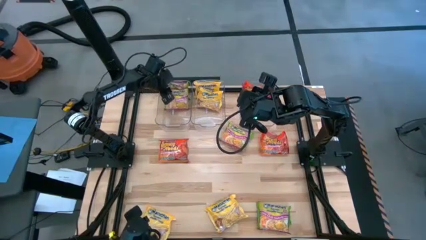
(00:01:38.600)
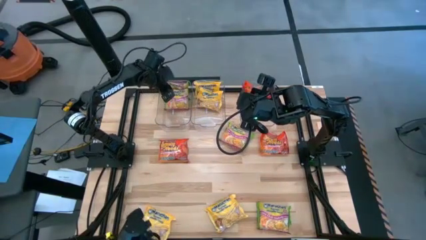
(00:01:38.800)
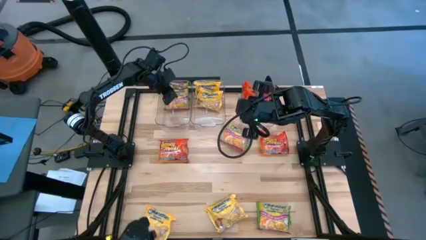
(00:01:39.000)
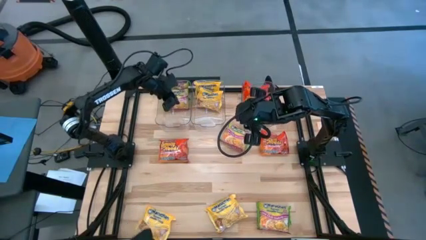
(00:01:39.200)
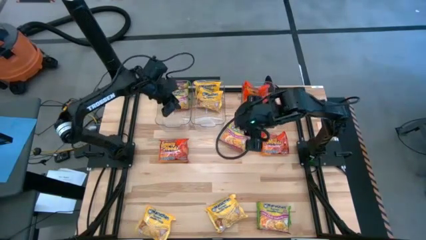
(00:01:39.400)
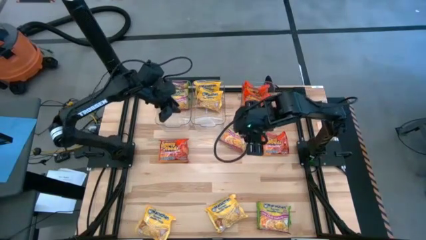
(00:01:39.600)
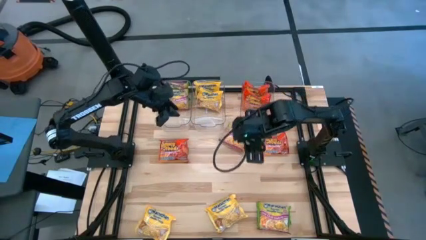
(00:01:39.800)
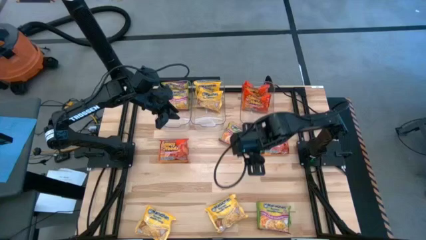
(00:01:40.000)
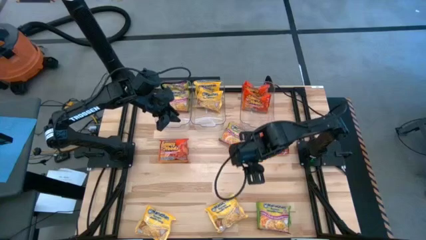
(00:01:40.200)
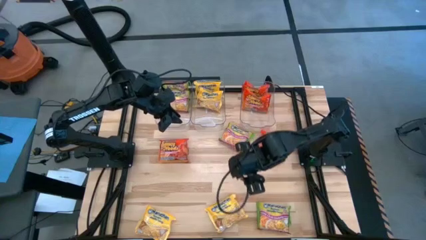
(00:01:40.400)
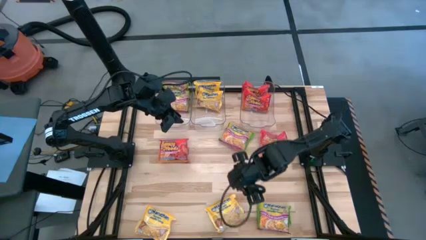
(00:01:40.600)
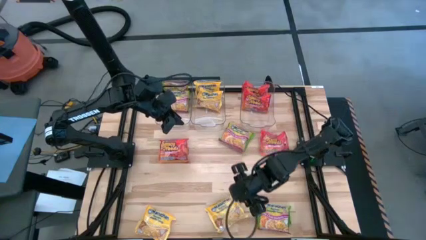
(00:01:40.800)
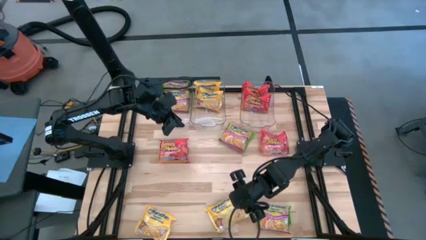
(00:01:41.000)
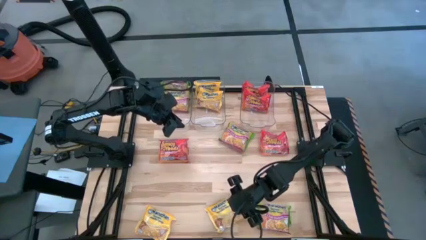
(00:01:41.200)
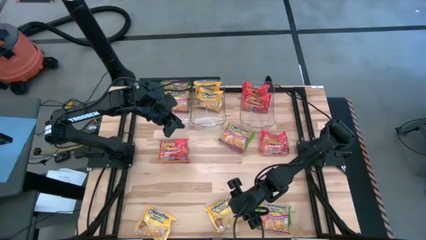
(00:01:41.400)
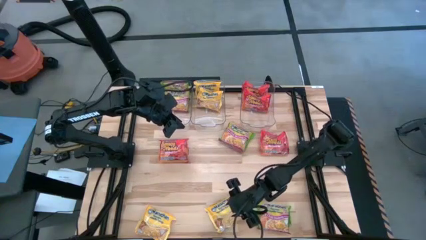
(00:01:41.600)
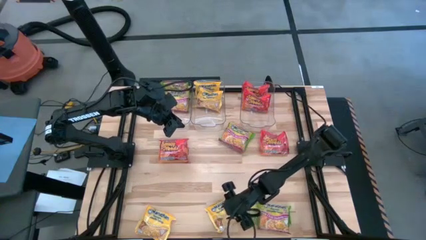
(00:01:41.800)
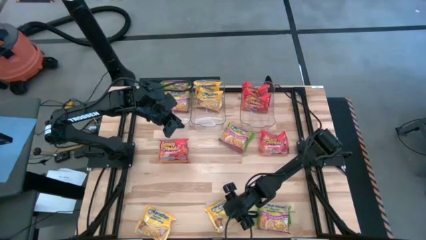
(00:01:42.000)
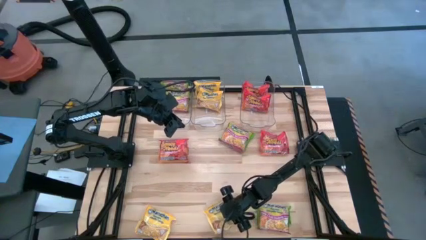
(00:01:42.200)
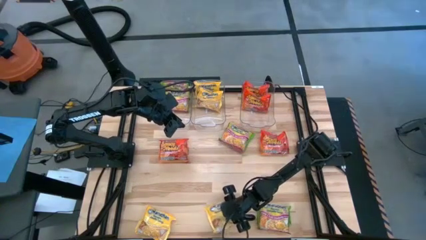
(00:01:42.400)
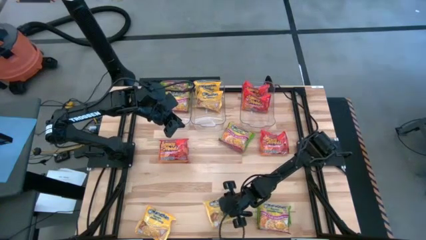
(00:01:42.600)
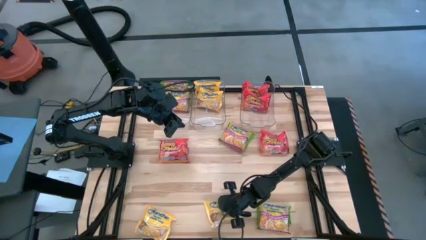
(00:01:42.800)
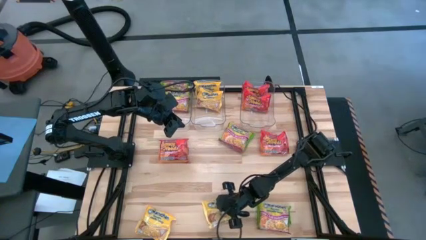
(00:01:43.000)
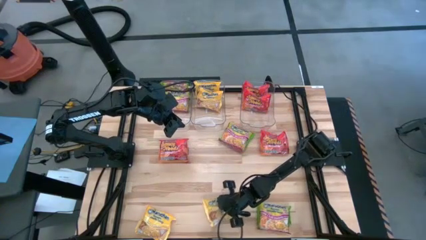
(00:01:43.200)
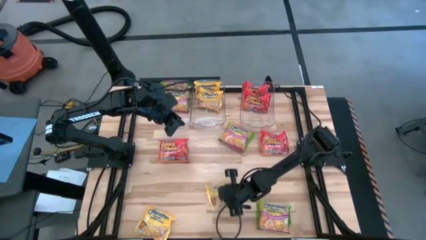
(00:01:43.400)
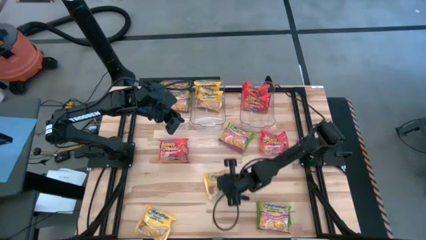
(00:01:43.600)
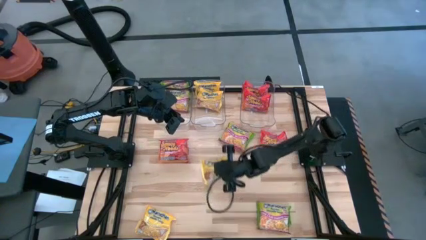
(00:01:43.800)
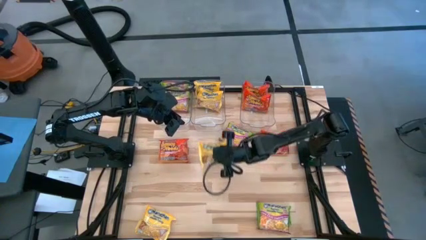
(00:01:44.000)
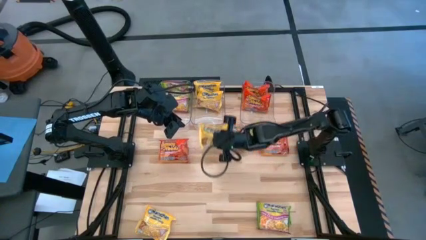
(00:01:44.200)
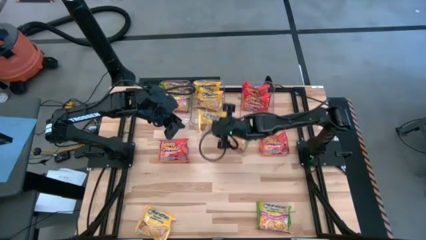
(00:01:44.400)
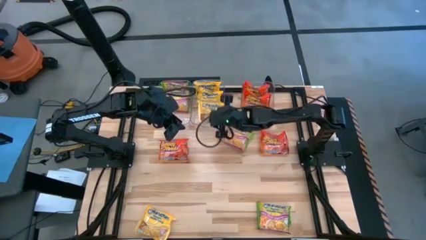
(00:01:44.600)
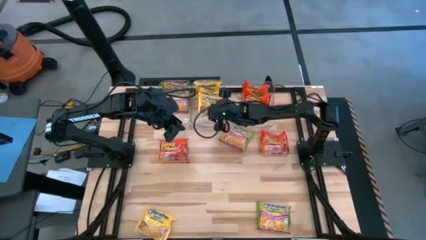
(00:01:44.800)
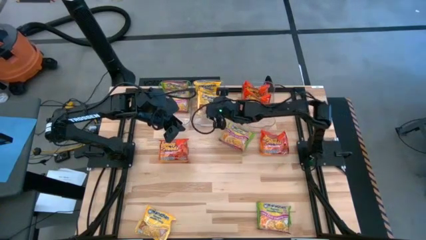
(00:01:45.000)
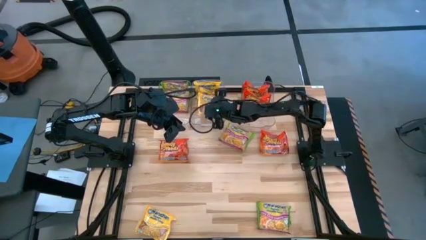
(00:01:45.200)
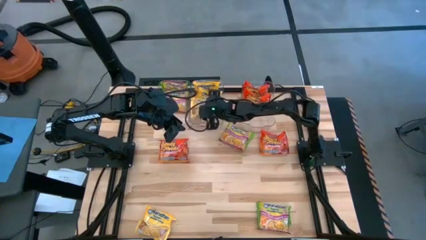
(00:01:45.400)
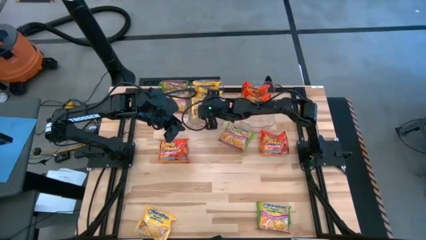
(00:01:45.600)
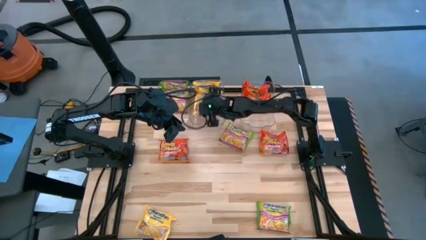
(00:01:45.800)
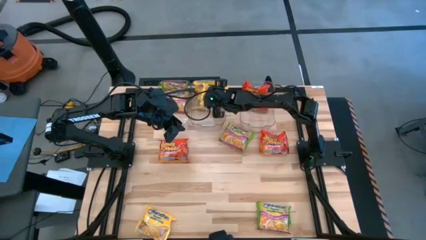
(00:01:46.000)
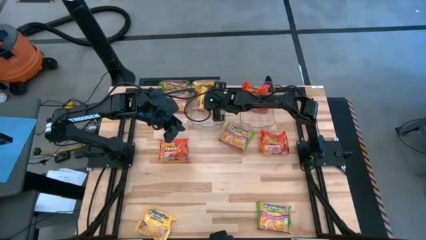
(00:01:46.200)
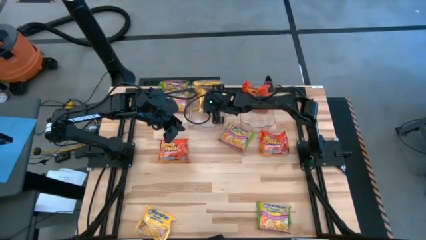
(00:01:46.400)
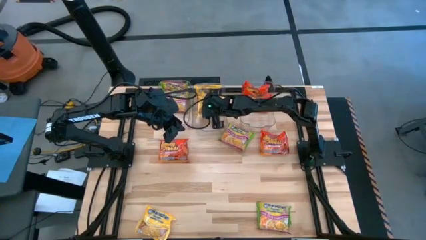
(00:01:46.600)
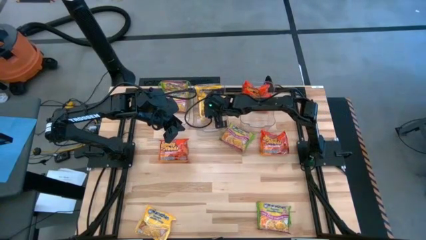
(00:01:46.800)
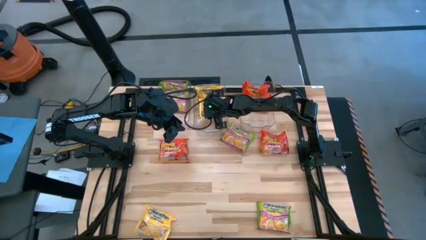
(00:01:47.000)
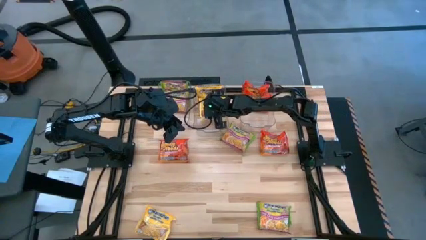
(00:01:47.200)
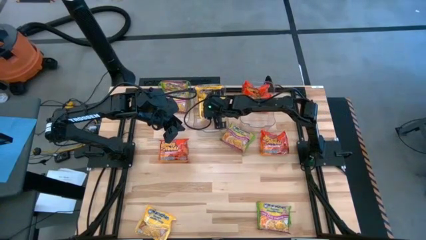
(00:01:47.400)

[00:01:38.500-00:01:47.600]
Task: Sort Maruchan noodles
Put the yellow noodle pack into the middle transparent bin

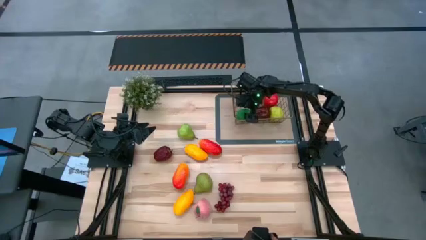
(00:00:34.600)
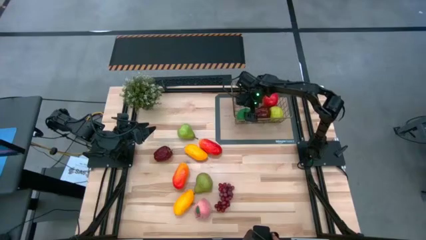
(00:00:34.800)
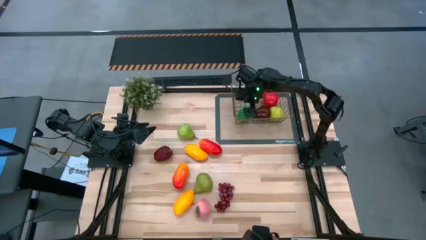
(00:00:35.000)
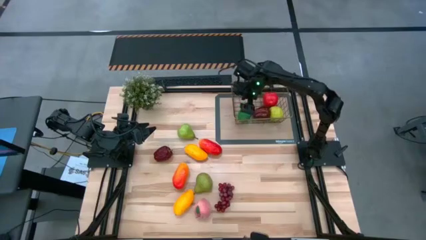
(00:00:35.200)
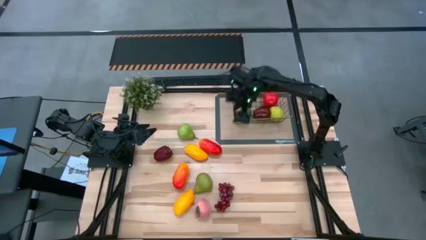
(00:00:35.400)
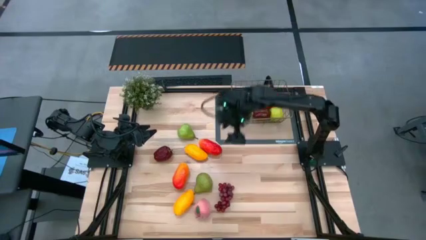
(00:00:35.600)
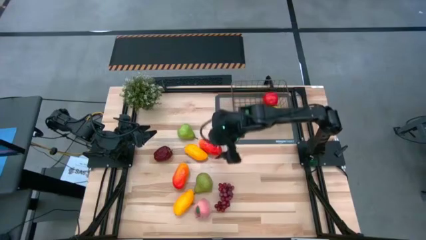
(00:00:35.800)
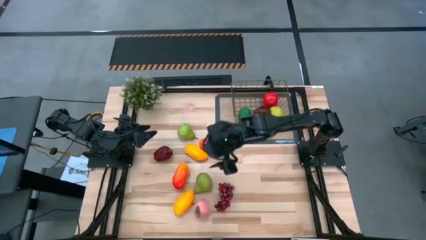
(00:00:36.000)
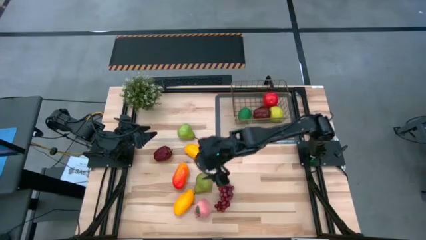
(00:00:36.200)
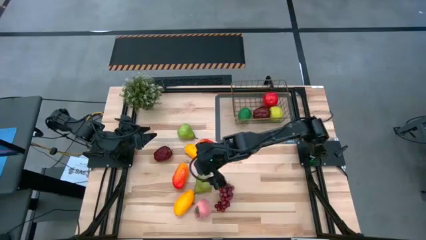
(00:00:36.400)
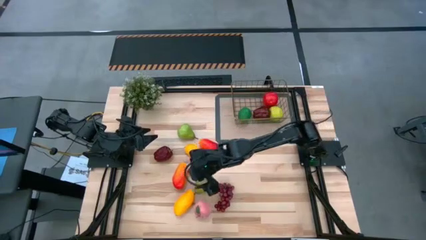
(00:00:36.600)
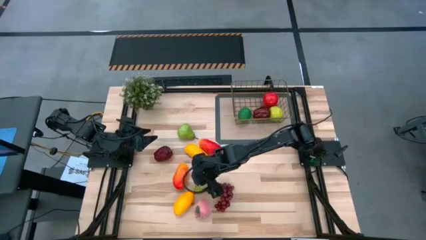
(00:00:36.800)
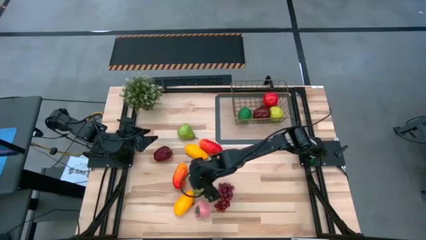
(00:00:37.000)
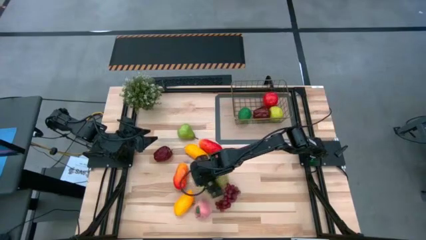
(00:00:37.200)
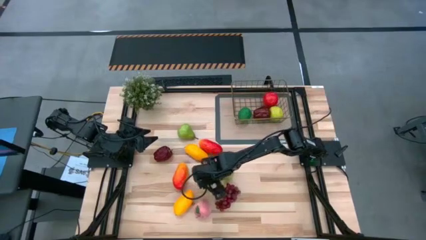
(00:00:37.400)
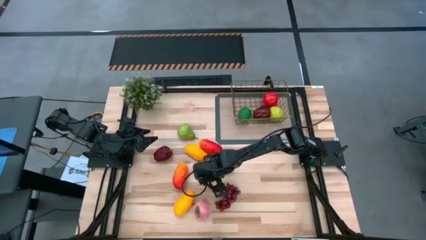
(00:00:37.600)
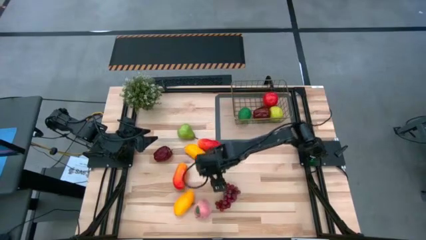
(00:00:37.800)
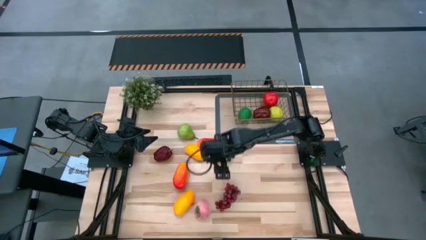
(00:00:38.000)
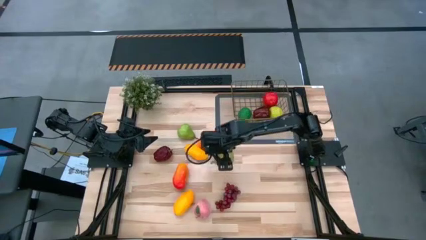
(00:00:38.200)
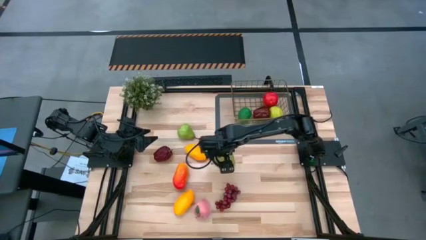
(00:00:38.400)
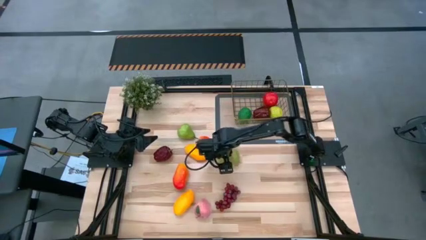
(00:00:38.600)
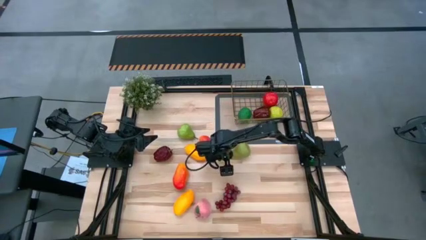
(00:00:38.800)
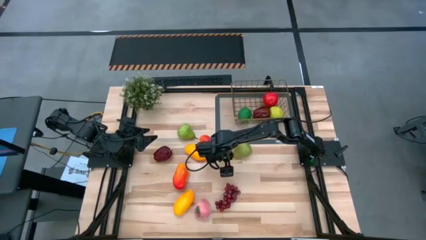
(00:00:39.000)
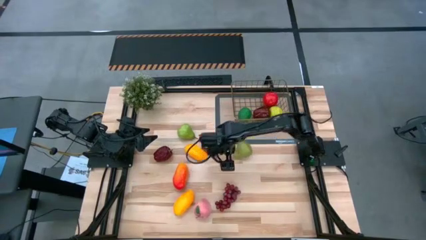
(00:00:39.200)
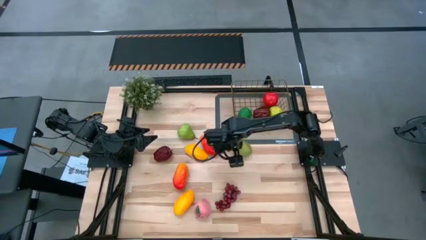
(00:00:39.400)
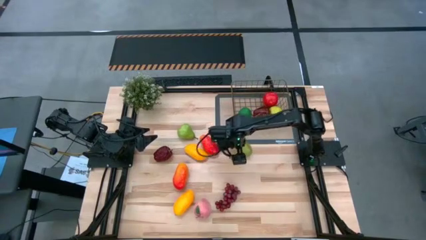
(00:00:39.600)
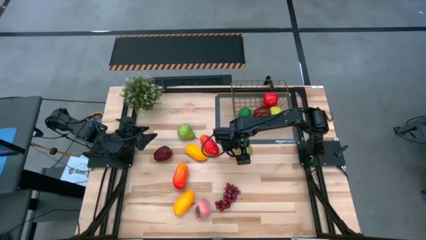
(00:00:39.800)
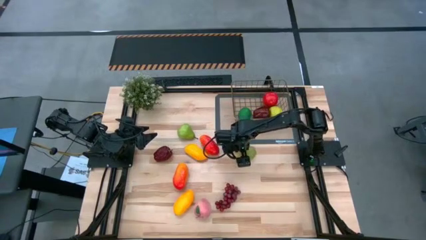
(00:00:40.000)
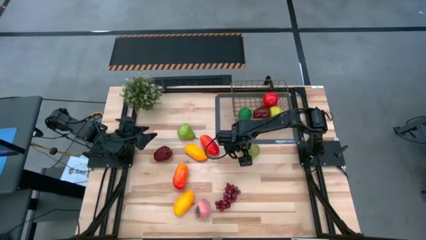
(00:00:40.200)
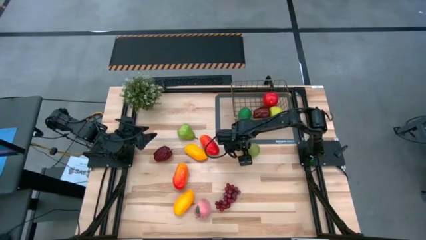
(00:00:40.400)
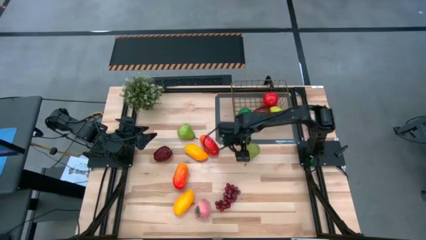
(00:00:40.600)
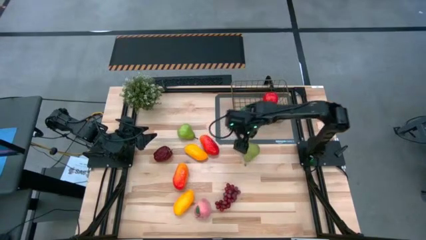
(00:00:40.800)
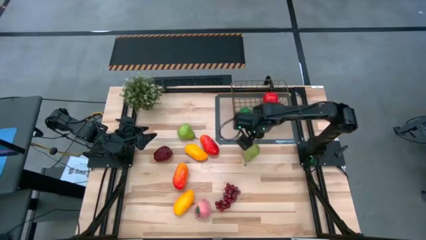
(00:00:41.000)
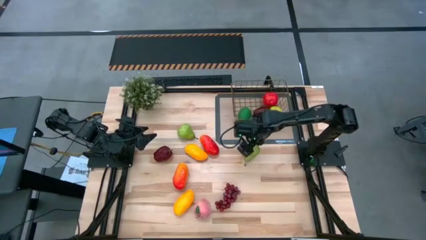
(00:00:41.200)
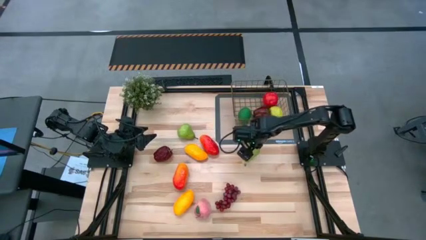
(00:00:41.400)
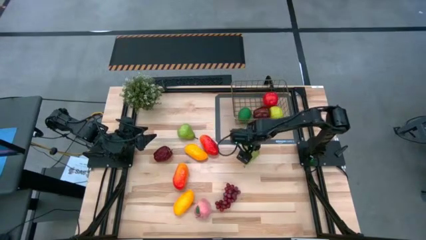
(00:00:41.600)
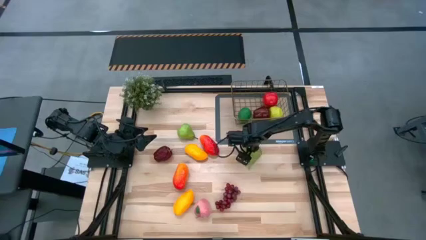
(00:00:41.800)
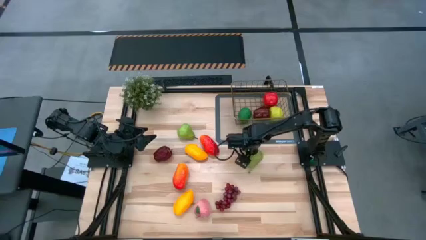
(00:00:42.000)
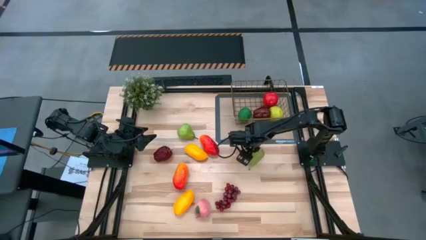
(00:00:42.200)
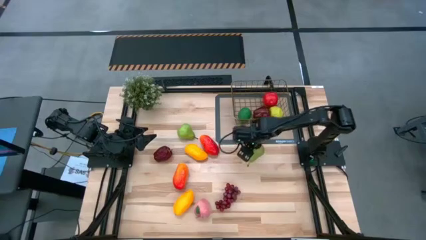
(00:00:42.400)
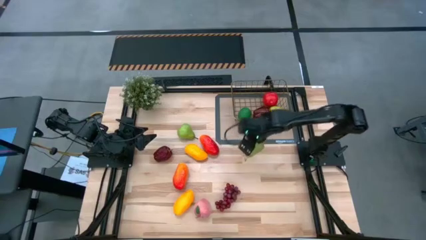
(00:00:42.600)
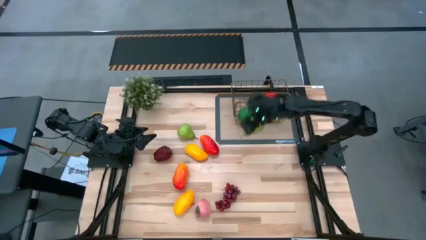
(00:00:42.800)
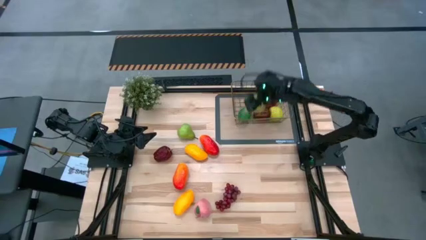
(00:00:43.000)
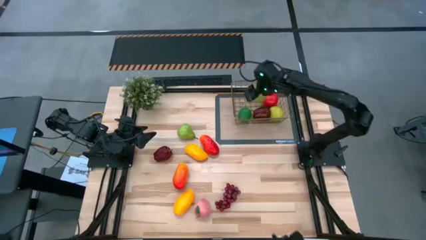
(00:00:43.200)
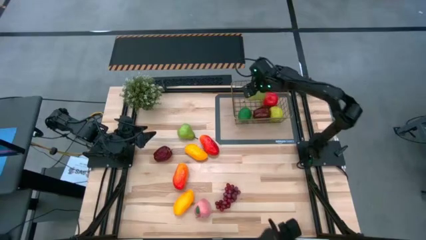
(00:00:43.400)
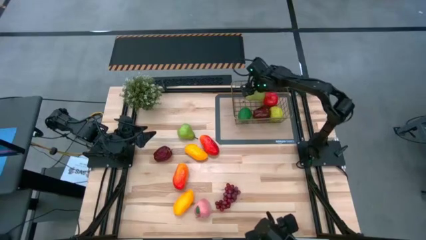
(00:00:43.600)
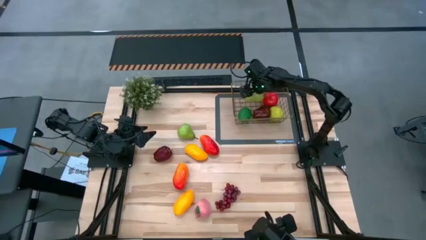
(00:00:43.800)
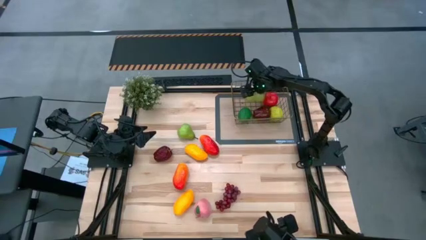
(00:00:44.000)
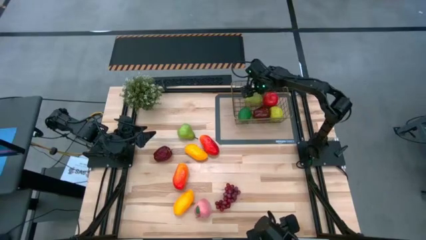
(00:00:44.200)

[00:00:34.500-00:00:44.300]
Task: Build produce basket
Put the green pear into the gold wire basket
